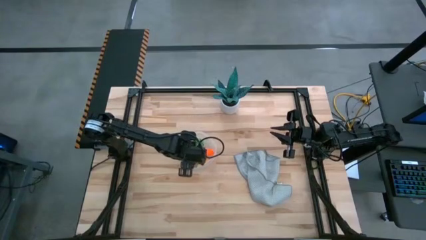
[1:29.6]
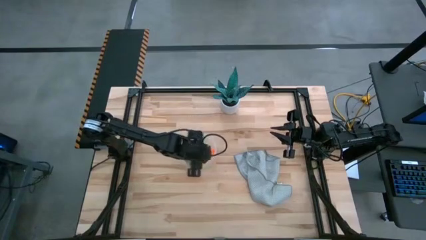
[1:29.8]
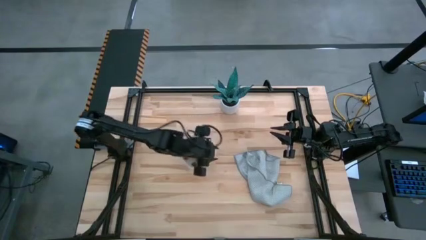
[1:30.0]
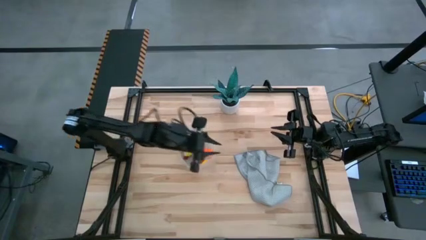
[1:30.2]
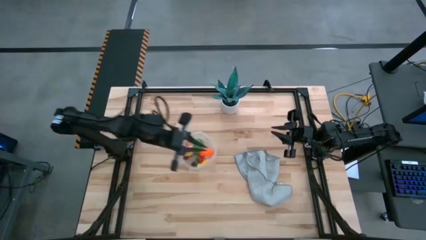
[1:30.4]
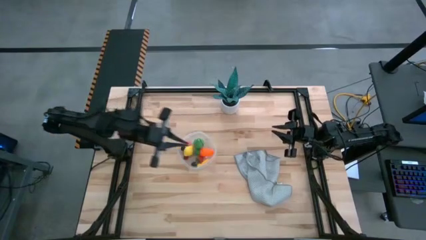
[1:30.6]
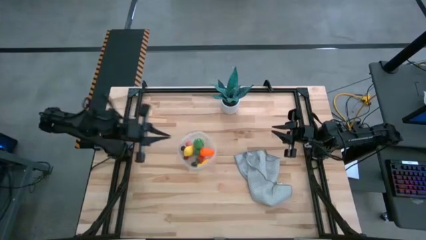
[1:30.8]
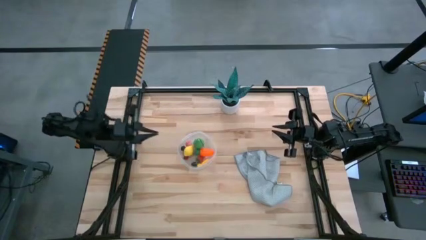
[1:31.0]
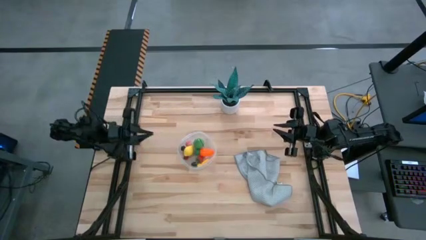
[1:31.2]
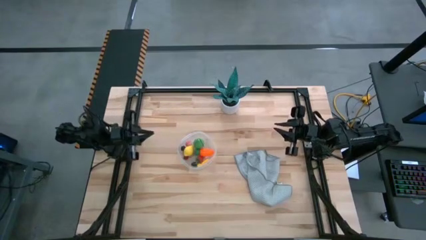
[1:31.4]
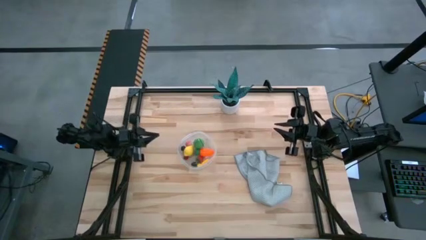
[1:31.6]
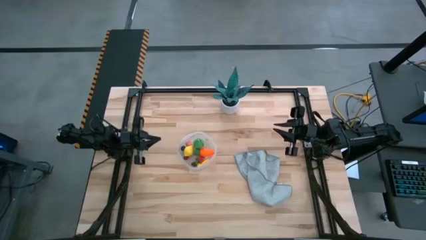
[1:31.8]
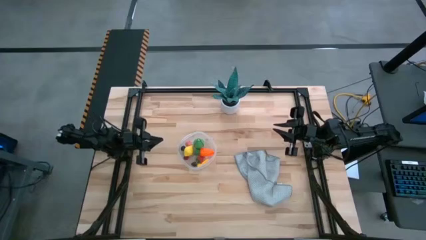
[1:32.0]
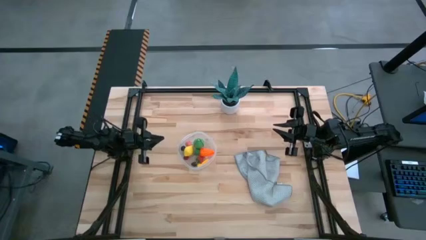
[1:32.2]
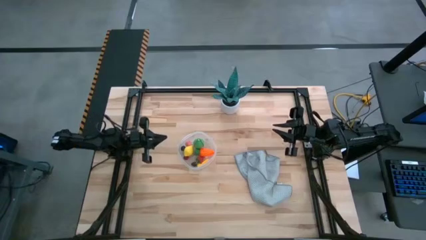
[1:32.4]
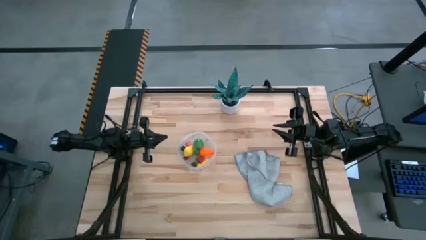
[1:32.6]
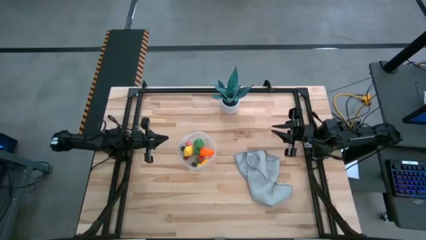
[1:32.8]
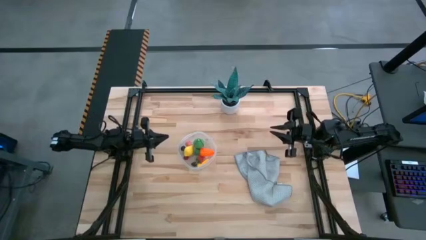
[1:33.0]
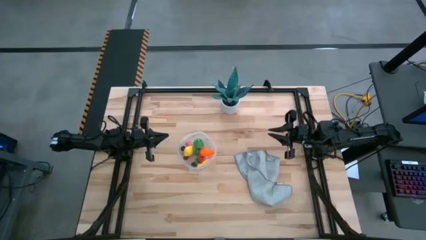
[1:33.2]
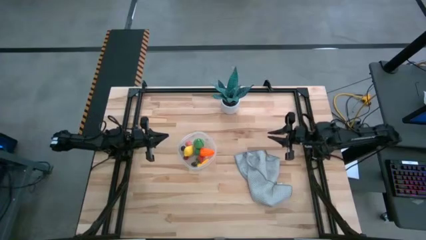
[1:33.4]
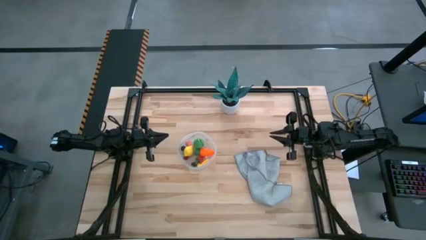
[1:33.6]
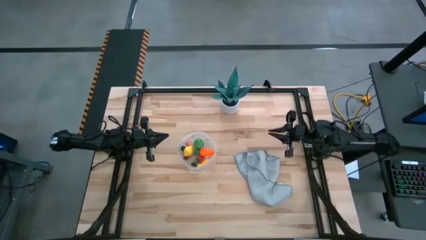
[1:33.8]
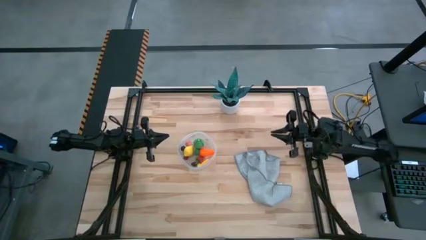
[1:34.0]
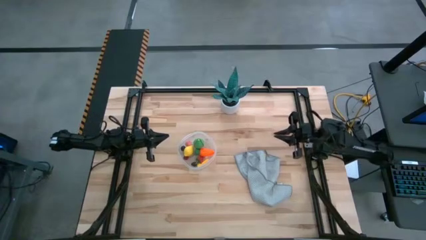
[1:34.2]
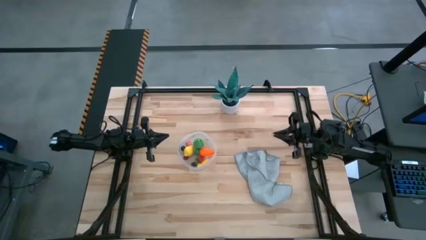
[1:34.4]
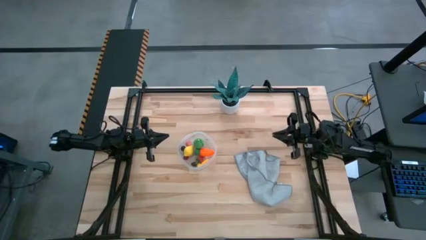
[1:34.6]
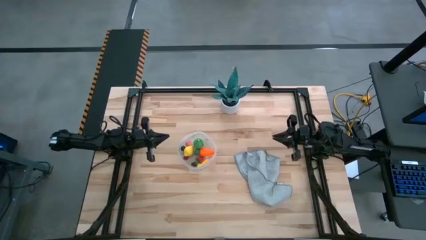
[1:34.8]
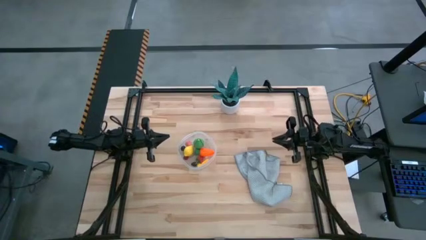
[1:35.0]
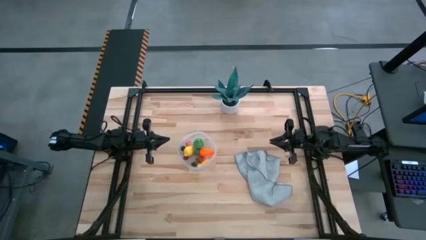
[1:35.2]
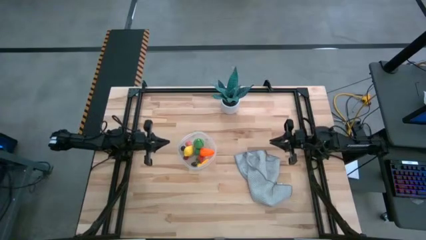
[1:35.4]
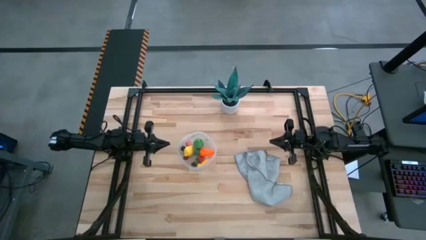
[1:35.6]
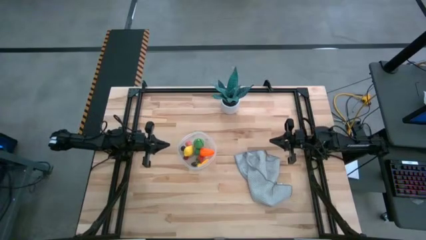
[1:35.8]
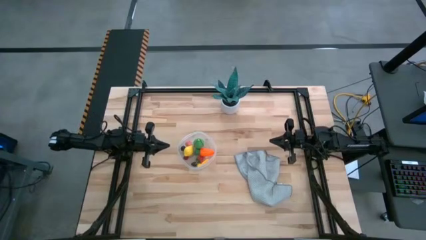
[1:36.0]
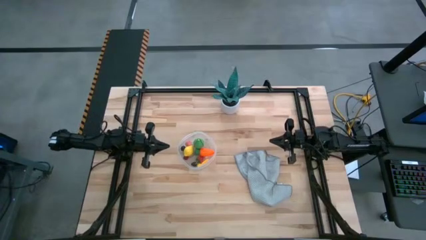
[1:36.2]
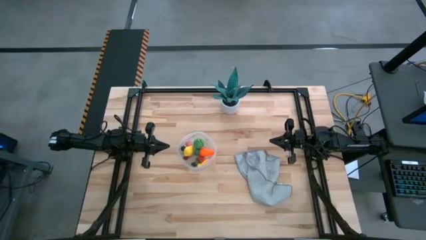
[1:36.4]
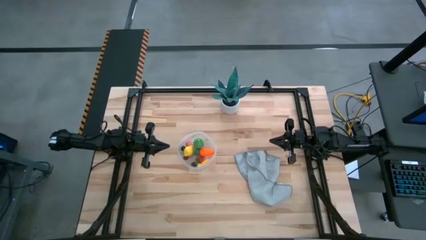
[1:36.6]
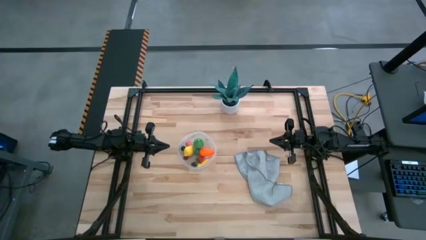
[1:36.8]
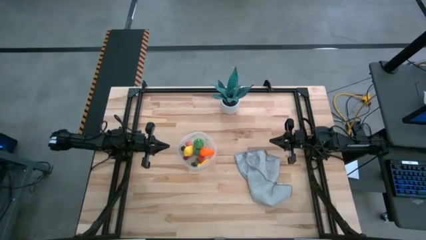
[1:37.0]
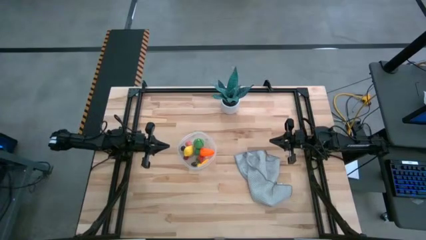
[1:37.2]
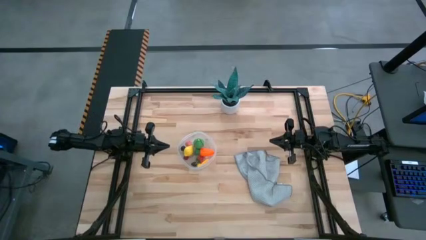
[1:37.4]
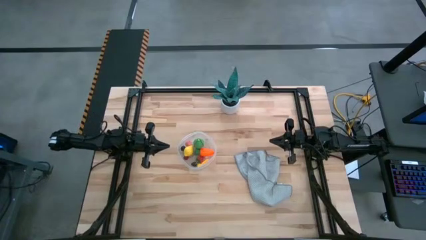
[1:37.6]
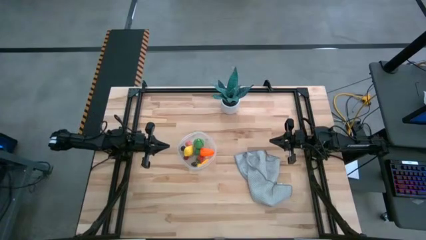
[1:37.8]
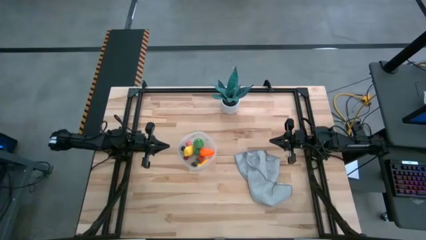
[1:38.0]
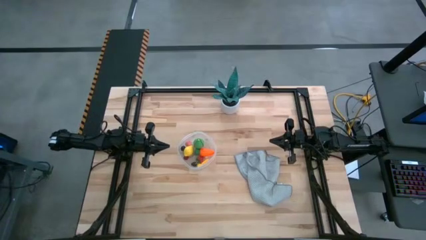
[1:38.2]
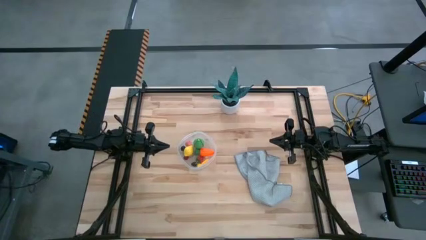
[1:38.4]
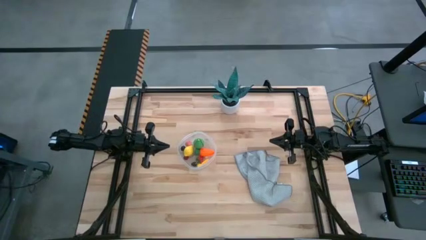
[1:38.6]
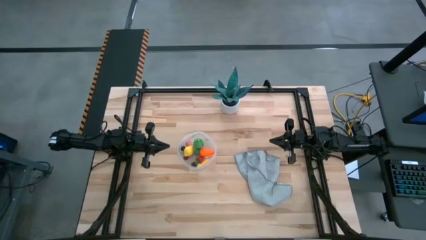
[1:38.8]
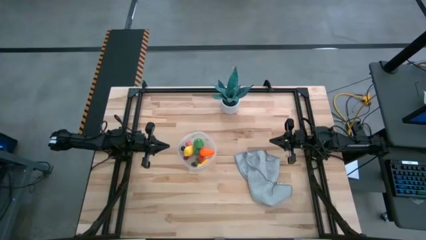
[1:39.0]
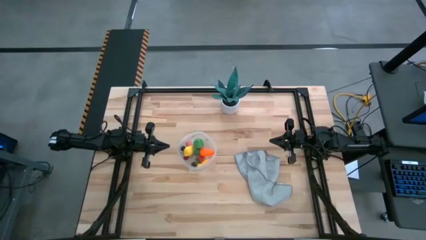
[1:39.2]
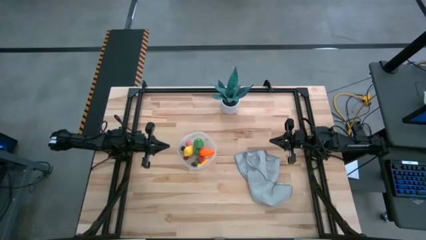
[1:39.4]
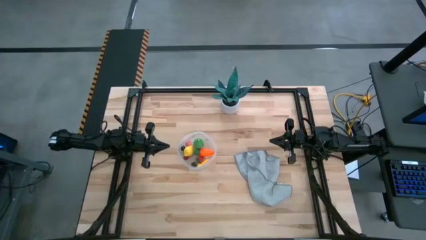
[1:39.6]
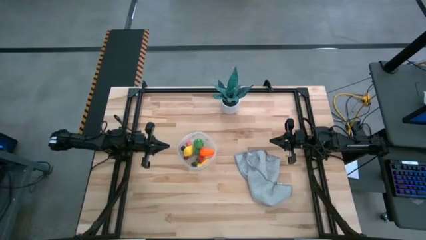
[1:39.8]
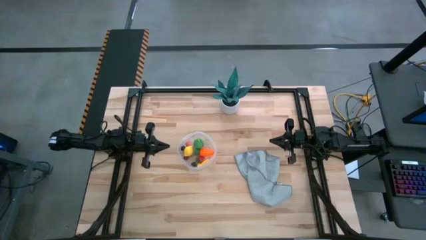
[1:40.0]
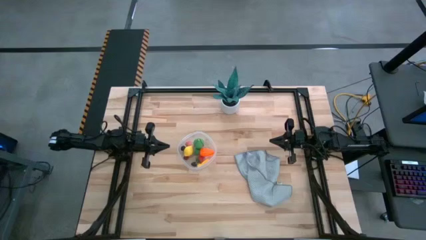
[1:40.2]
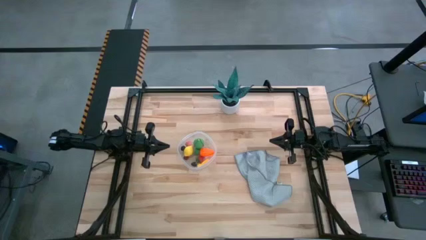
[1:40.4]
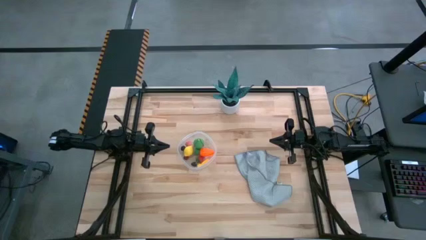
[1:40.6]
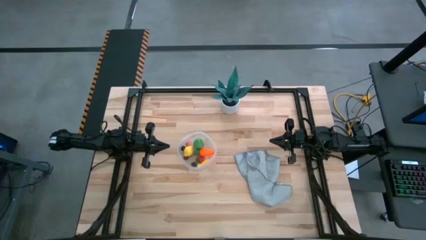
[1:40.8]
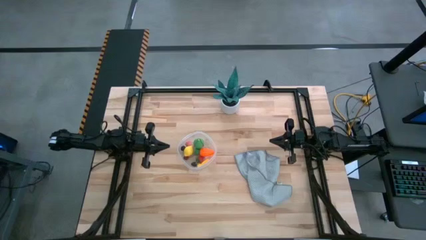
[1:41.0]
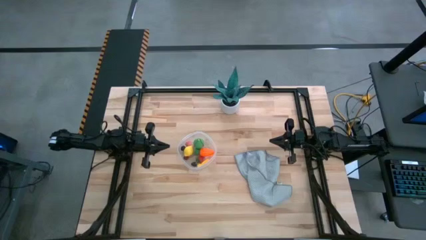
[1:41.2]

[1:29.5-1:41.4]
Task: Pick and placing Produce into tupperware
Return to Home Position

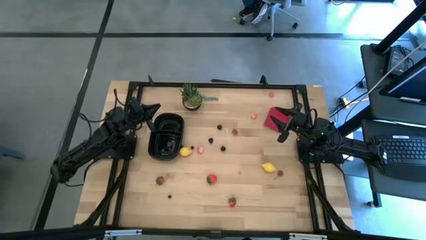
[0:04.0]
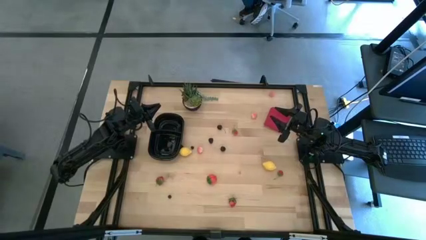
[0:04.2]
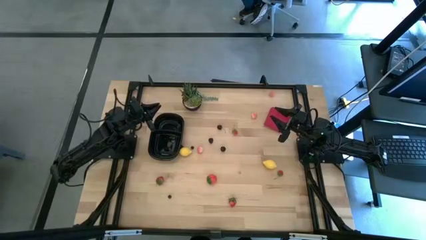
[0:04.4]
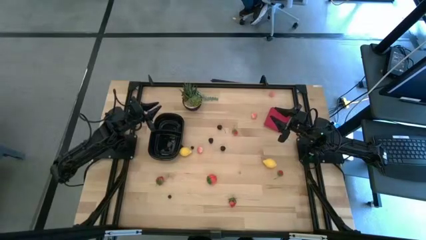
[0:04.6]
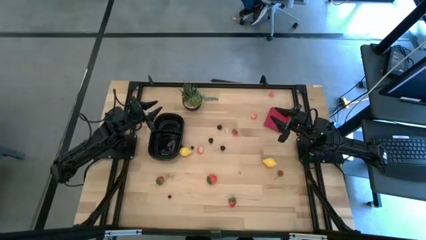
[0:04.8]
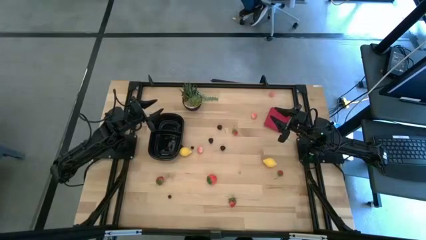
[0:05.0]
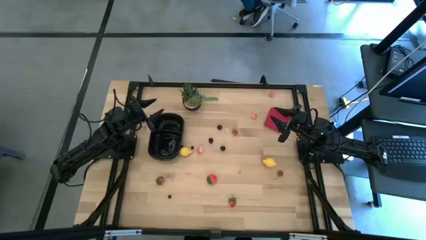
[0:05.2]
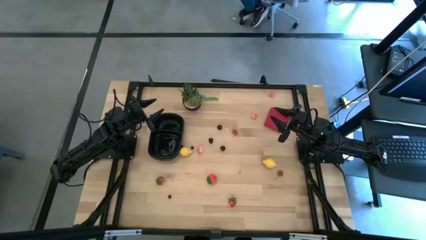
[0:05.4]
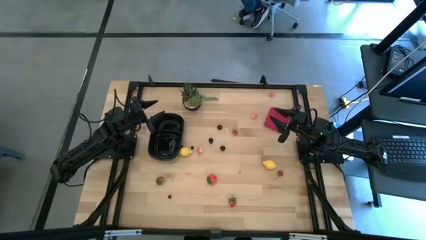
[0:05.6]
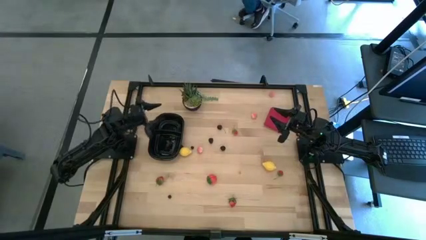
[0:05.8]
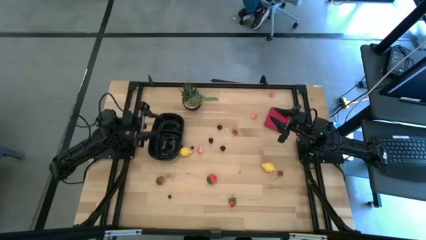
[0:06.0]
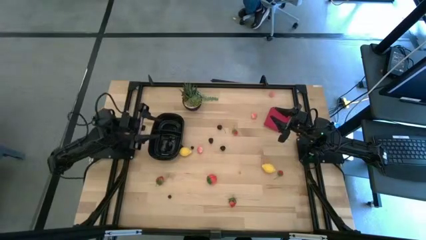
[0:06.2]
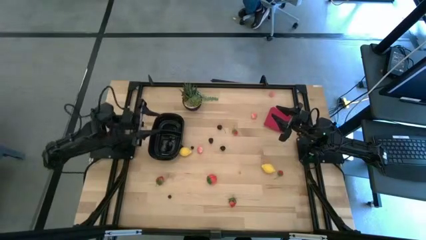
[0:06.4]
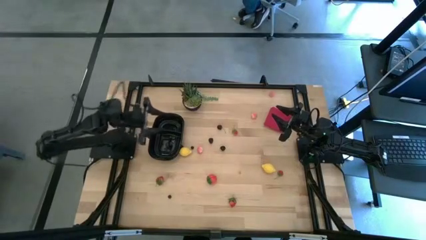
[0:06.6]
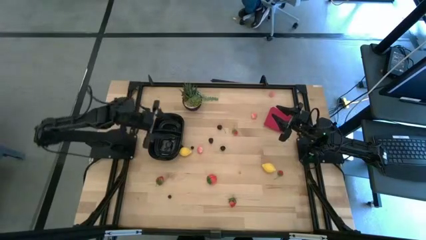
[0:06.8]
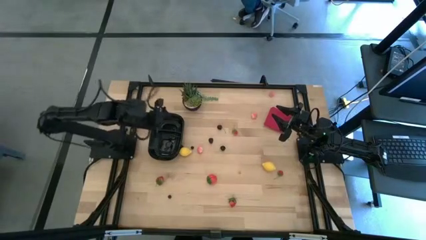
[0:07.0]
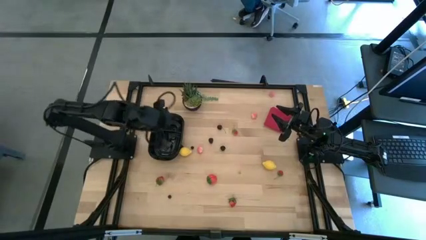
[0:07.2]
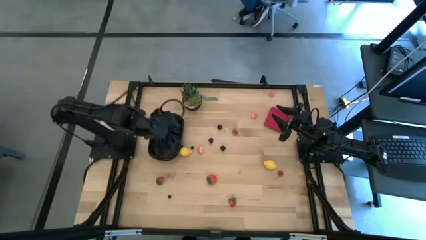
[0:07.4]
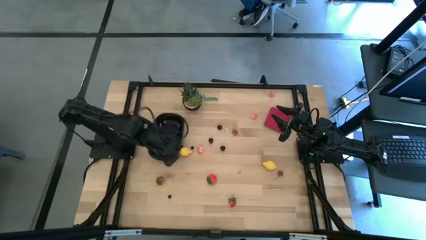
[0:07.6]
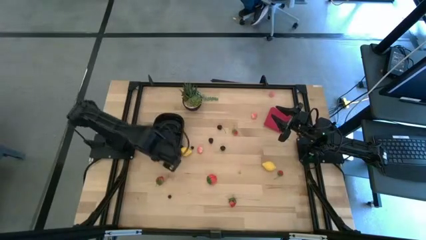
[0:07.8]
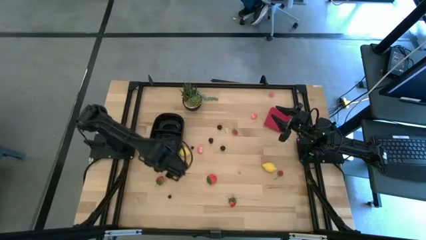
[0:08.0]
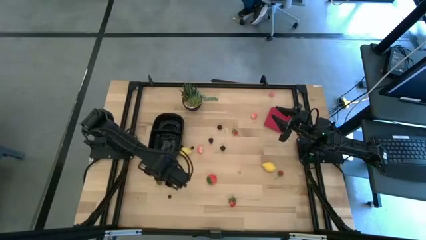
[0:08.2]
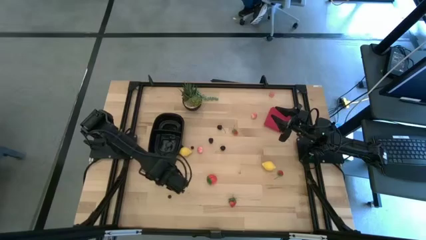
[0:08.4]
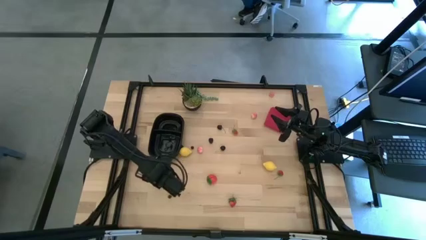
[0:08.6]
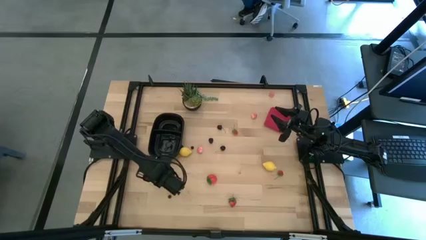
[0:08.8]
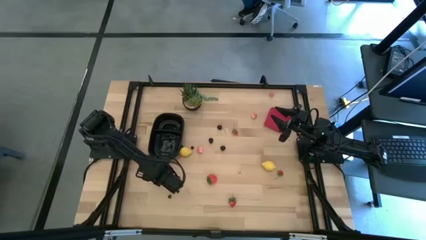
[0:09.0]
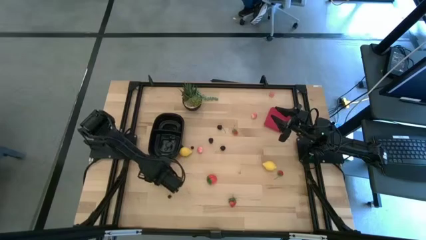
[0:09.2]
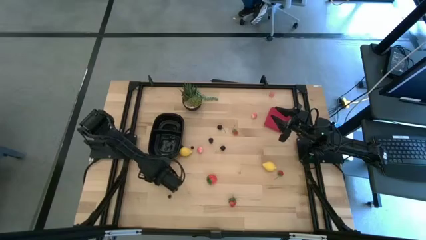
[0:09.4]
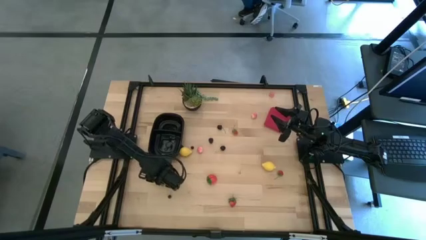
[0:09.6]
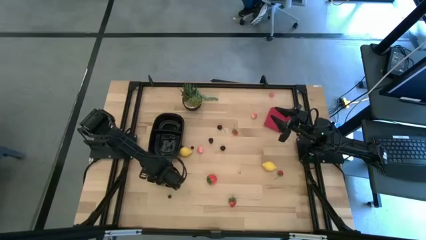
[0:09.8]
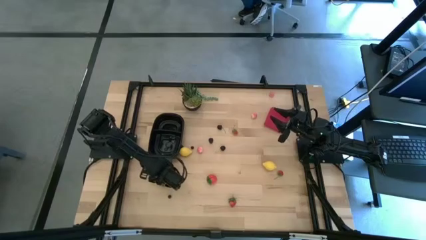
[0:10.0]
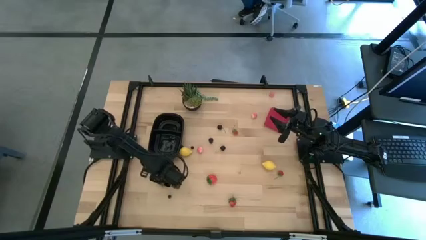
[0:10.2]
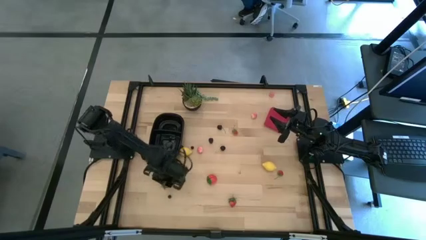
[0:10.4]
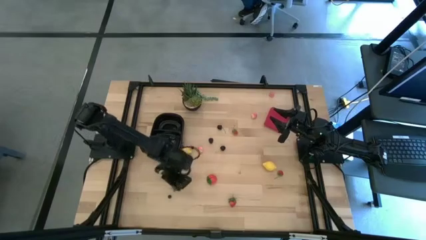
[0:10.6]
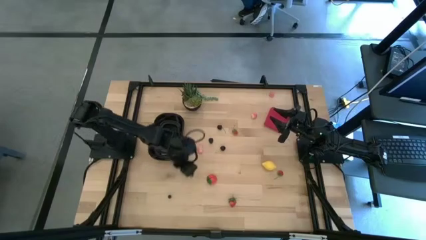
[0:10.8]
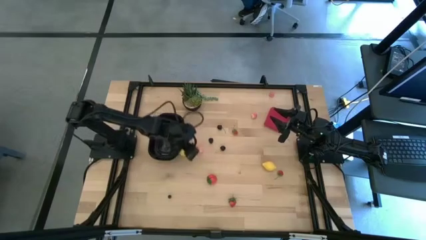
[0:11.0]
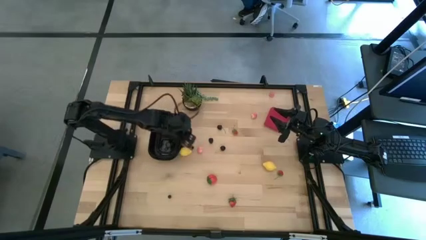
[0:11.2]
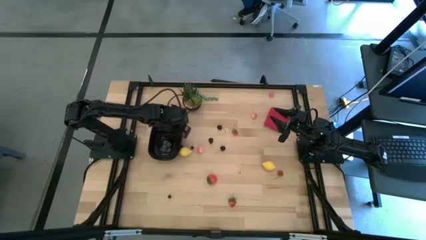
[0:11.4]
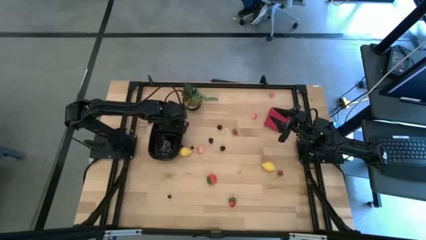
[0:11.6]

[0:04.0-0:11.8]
Task: Pick and placing Produce into tupperware
Put the red strawberry into the black container
